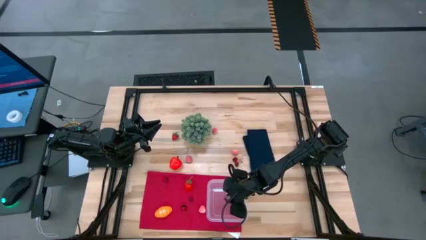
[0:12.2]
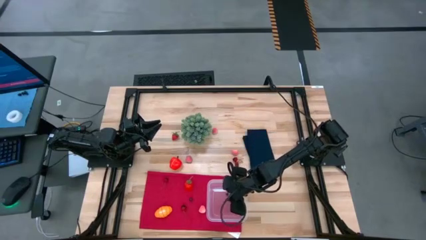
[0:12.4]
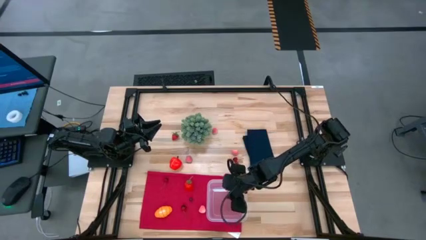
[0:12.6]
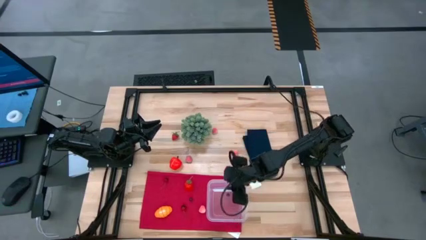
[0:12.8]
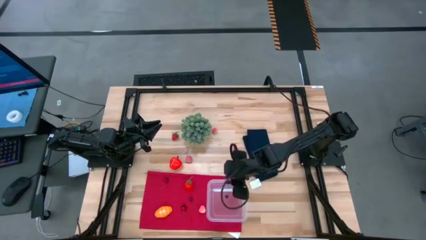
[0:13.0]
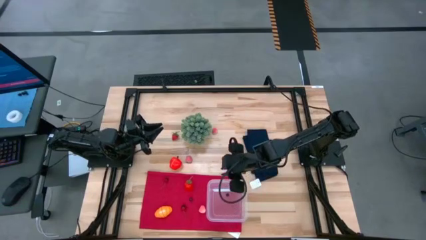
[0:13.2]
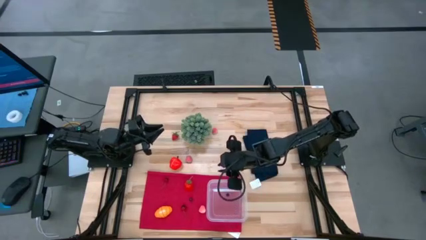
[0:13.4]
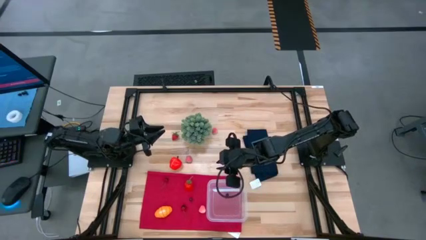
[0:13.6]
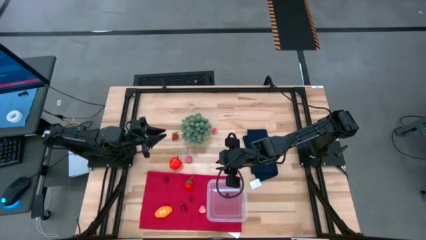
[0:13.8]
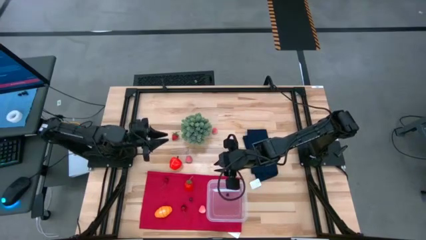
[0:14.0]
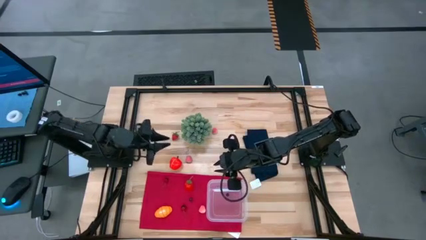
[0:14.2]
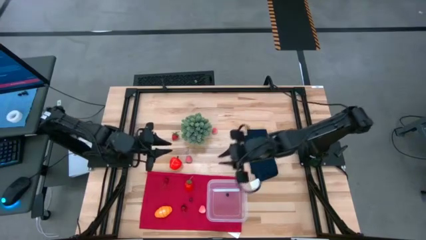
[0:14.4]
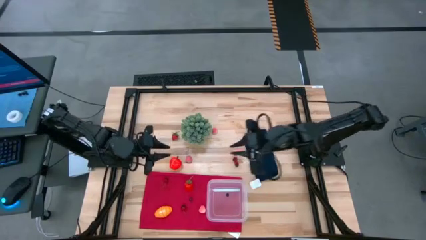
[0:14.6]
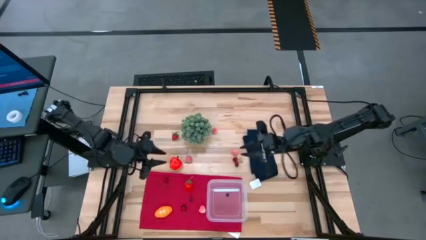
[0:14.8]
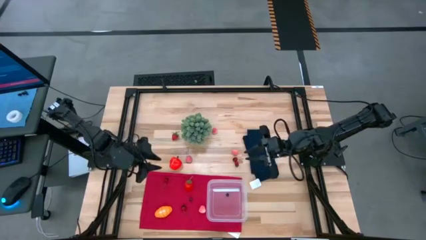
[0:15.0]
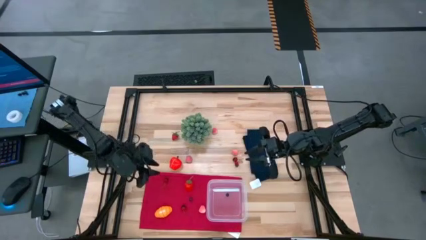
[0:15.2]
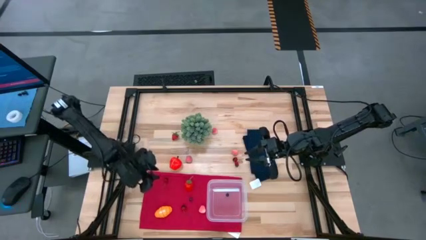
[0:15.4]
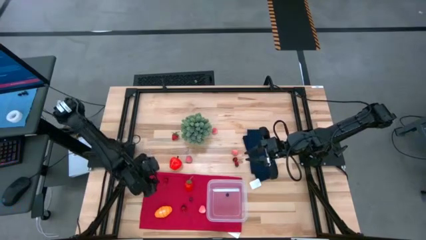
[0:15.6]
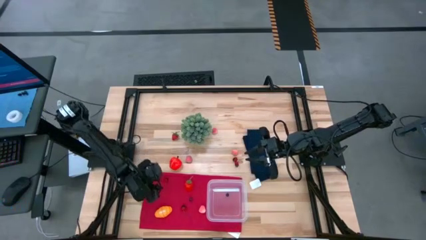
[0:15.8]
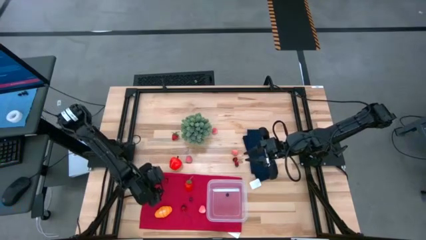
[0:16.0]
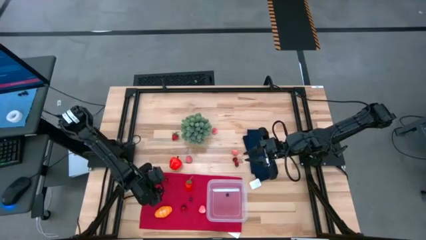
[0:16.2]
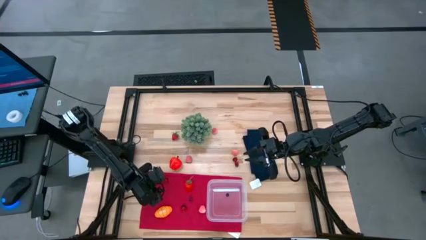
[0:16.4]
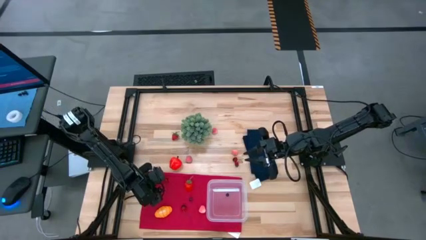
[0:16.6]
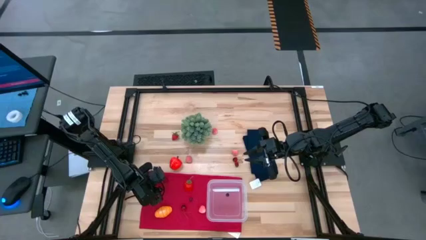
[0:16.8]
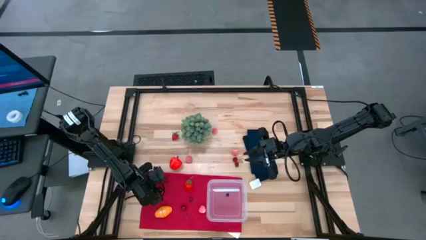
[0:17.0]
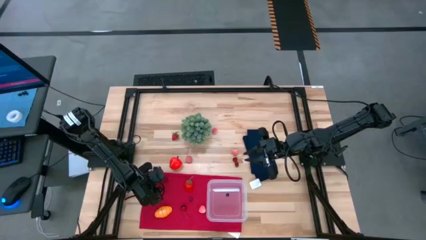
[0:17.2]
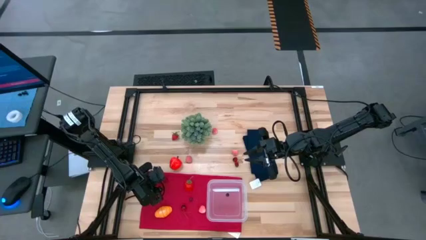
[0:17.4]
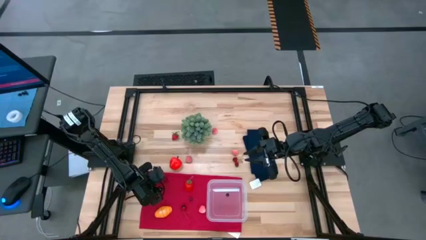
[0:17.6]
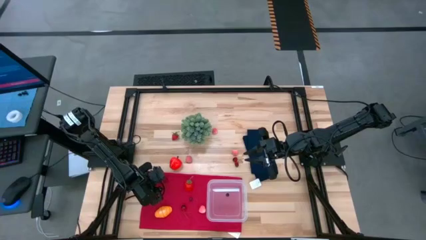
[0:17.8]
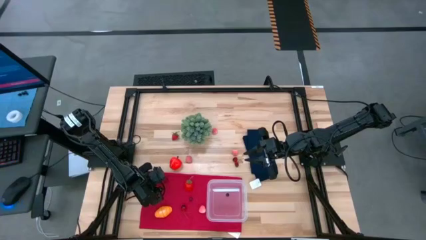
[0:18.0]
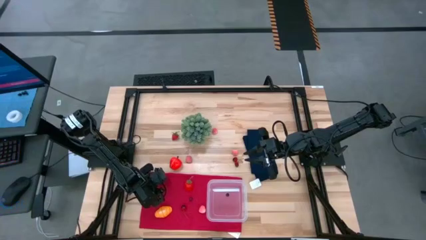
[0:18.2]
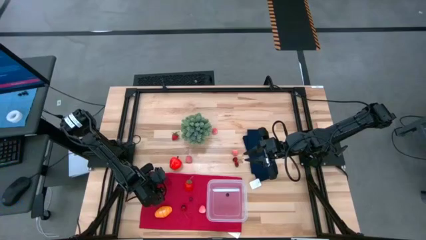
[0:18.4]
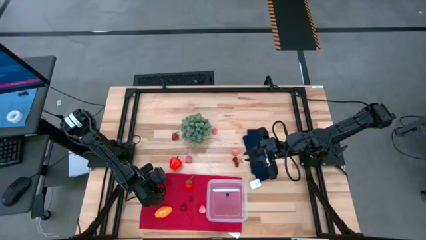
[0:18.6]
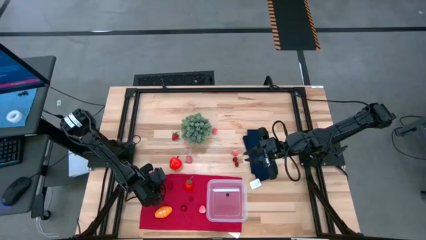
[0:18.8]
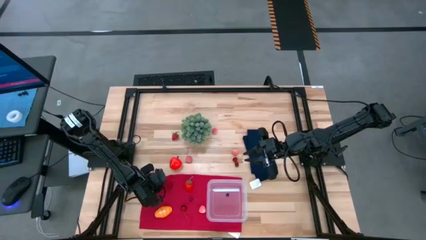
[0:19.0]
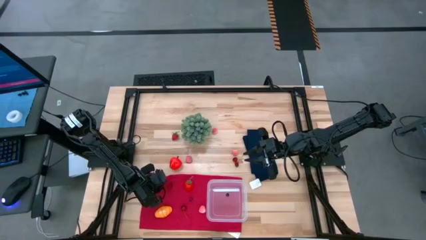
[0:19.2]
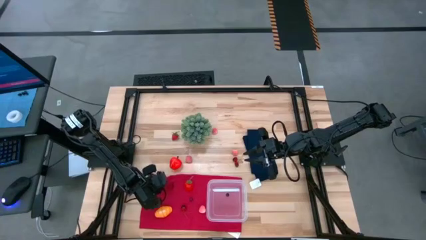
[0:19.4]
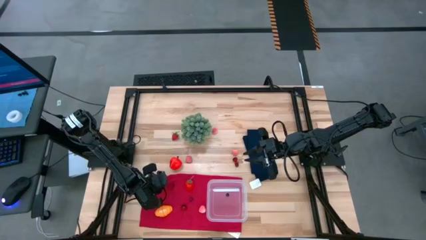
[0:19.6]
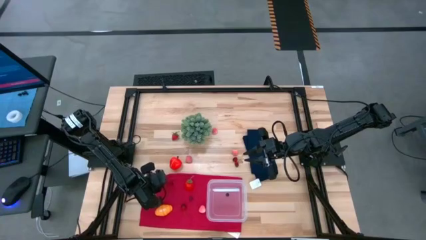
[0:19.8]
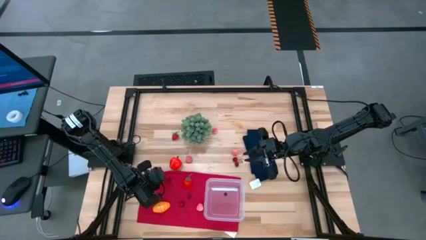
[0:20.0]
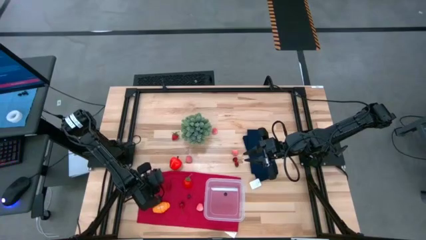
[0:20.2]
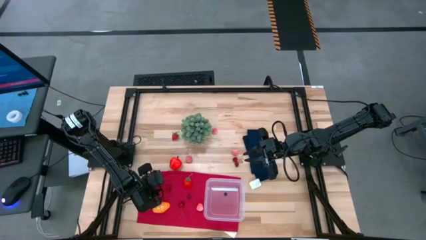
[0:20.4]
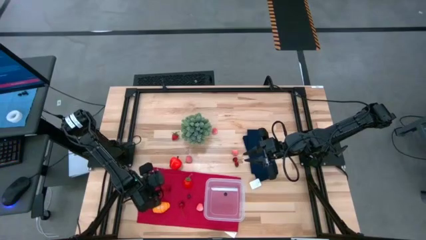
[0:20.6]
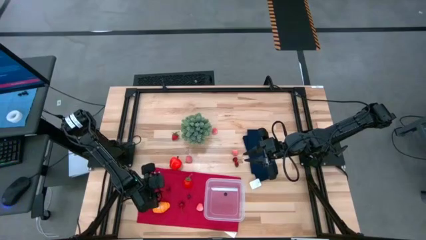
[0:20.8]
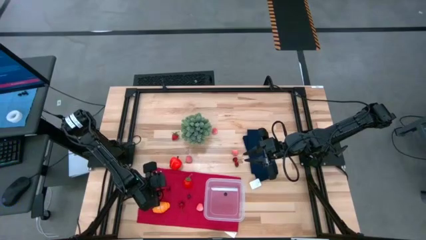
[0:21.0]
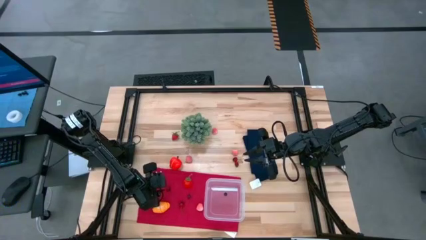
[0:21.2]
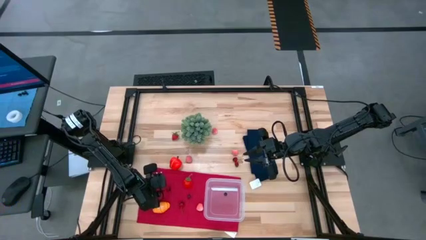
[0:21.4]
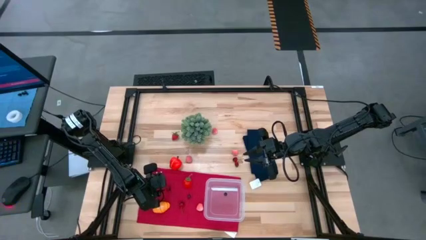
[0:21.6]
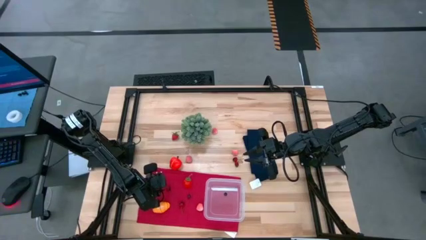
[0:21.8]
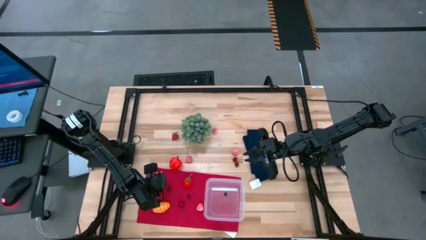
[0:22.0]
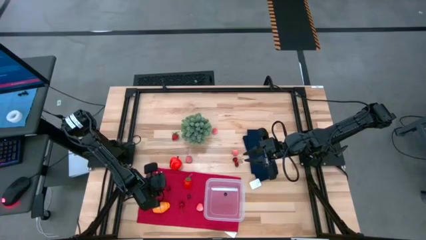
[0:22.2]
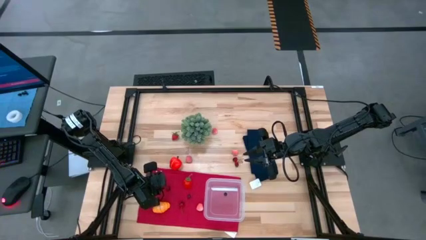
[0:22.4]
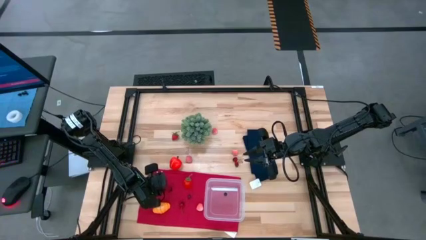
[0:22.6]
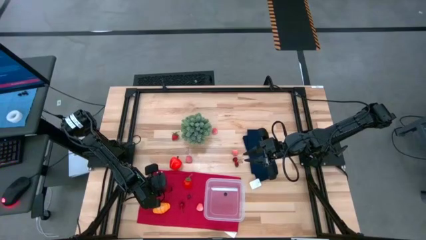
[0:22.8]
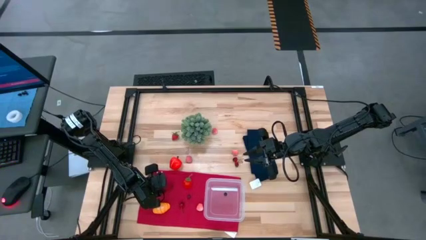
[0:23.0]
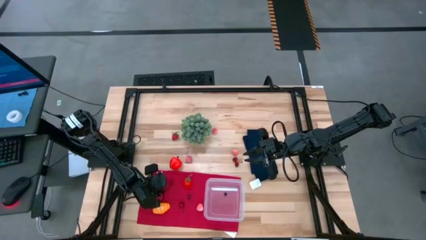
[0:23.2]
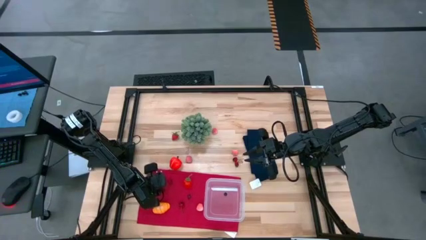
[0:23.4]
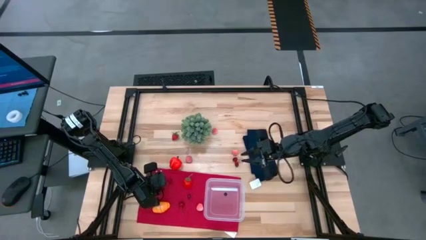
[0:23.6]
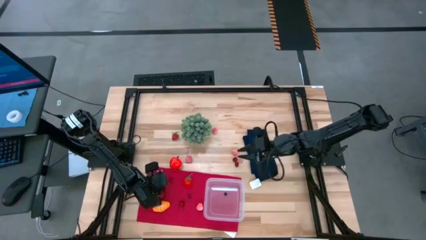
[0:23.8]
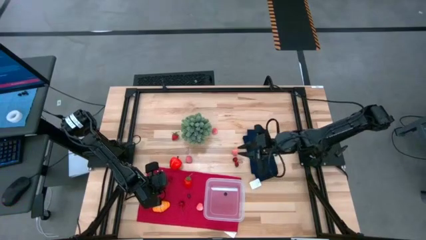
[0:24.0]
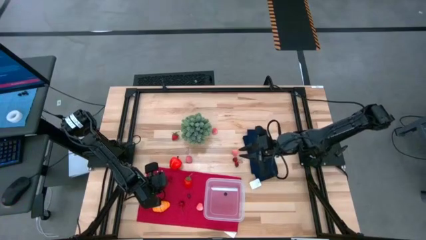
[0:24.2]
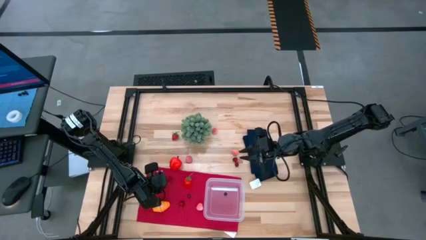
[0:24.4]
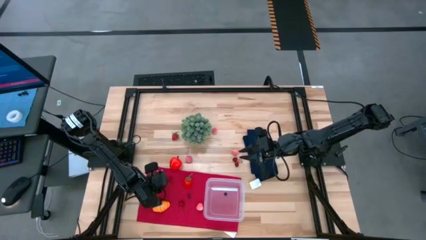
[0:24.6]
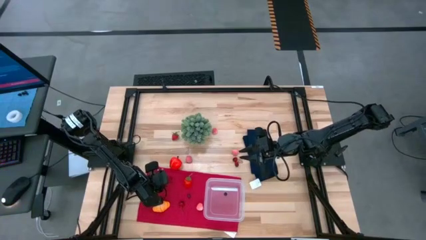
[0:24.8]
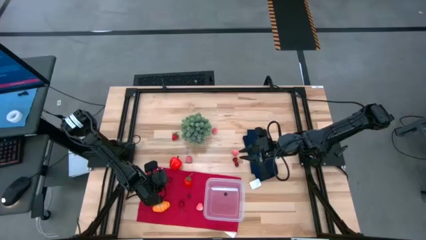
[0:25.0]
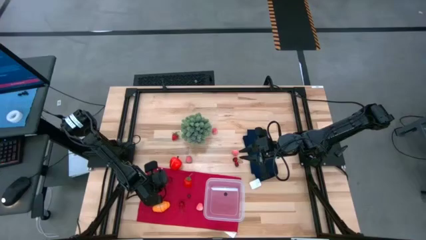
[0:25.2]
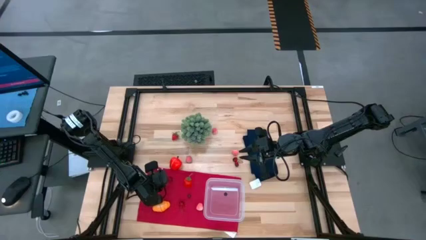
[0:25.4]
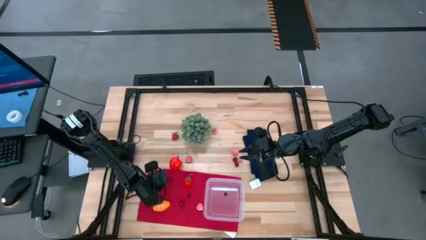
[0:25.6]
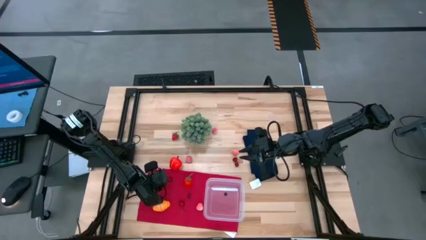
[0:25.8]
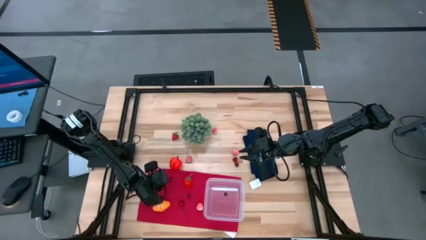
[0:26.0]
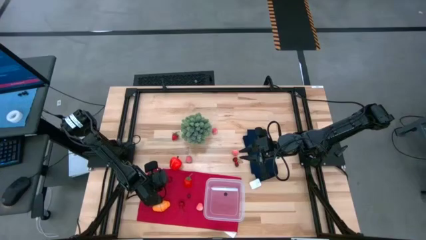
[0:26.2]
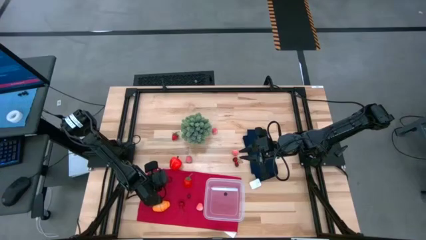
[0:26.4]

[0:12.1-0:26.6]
Task: Pick and placing Produce into tupperware
Put the cherry into the transparent bin

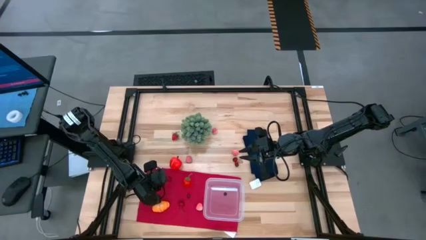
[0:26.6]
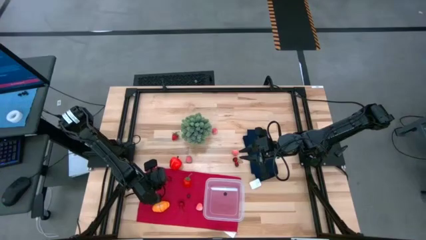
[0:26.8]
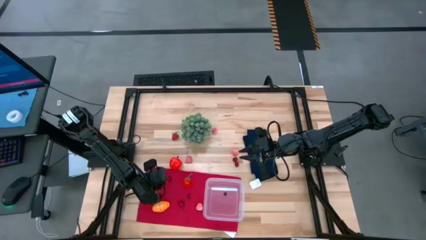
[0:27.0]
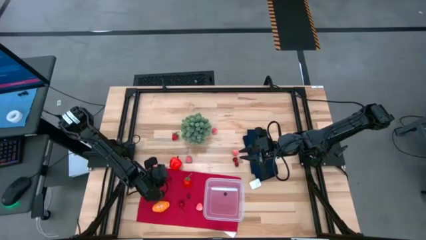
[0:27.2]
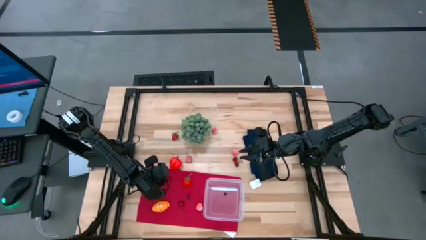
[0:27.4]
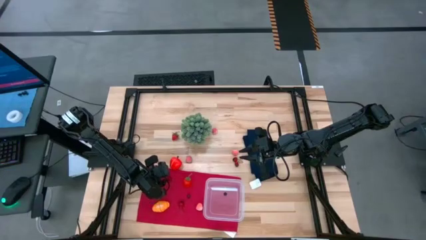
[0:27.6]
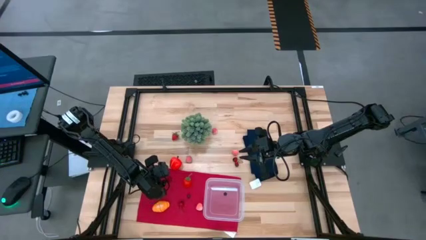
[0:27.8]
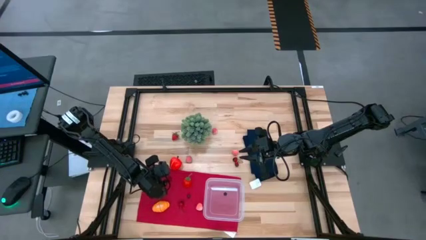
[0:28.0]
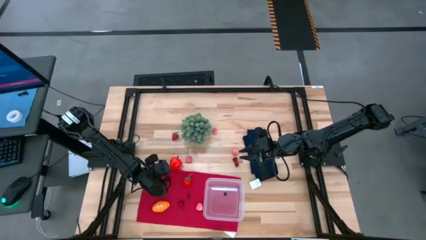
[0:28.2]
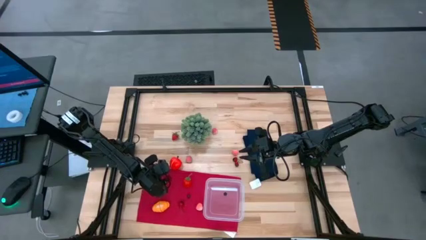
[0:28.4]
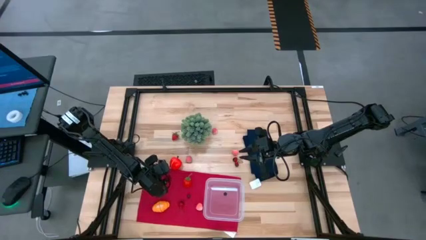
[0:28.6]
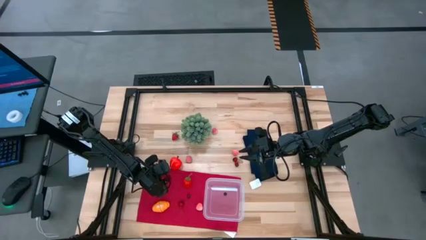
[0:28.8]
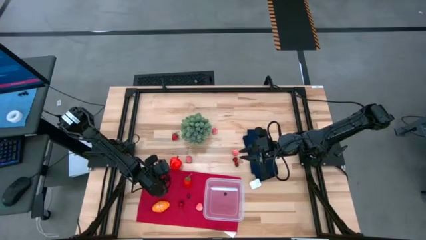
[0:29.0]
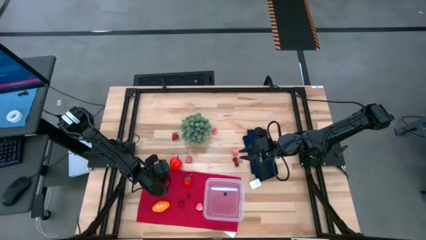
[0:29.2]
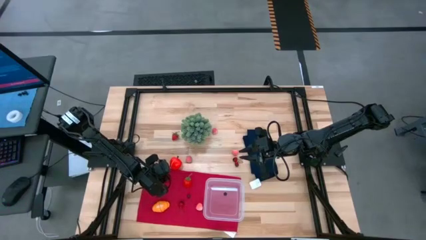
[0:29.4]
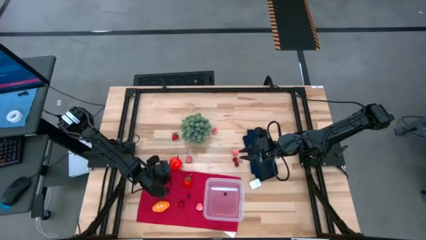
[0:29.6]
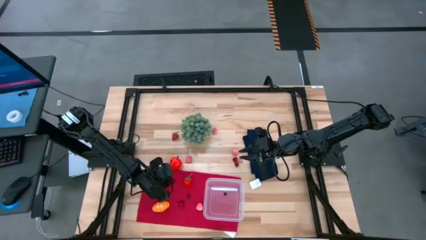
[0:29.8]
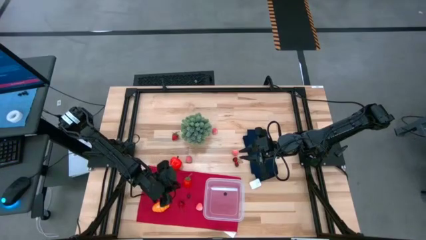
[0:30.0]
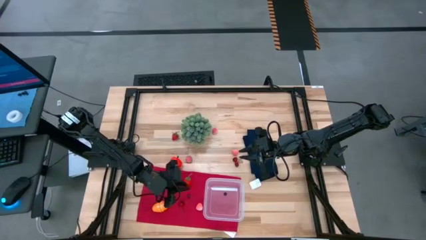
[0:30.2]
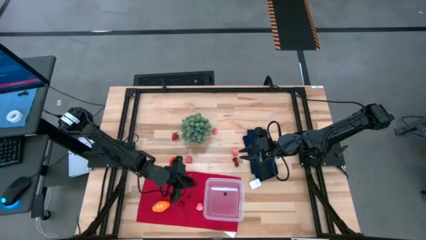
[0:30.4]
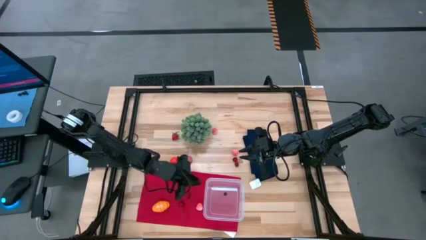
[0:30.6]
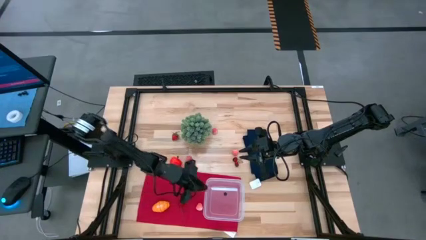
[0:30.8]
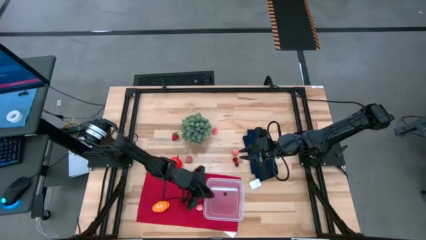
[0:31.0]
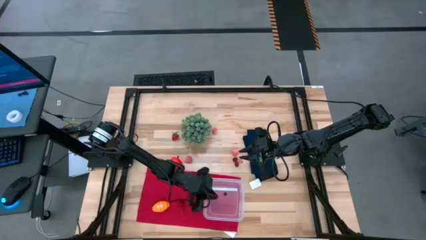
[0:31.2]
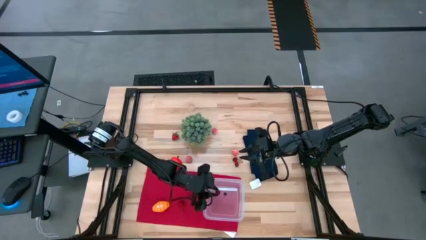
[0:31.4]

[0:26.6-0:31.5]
Put the cherry into the transparent bin
